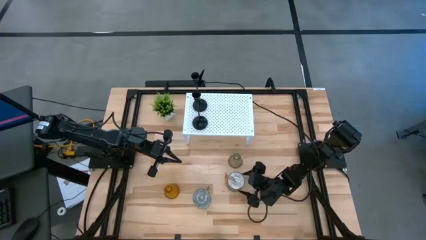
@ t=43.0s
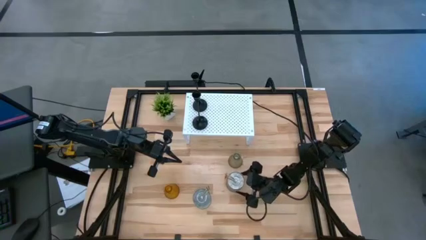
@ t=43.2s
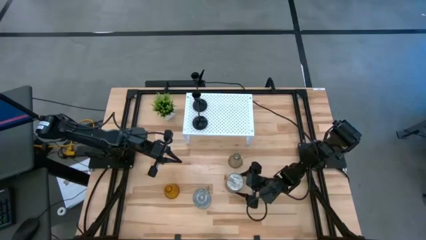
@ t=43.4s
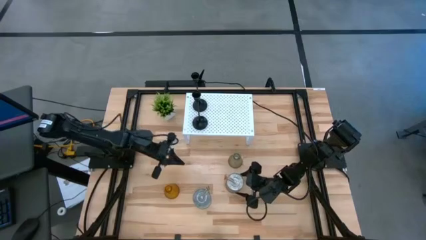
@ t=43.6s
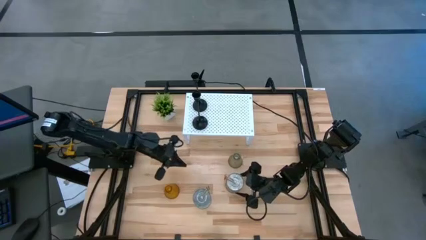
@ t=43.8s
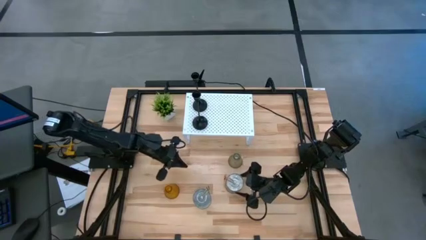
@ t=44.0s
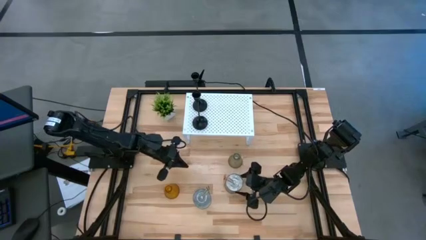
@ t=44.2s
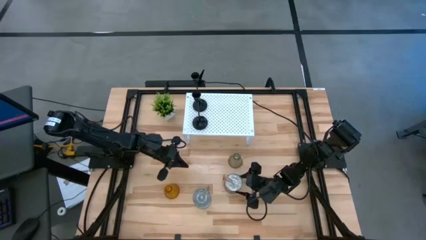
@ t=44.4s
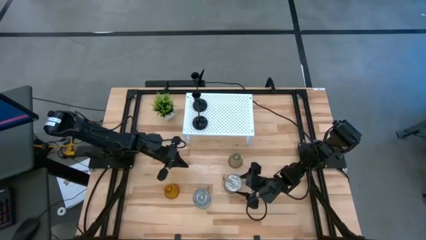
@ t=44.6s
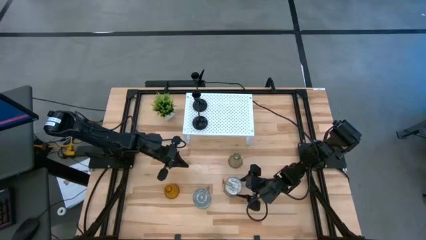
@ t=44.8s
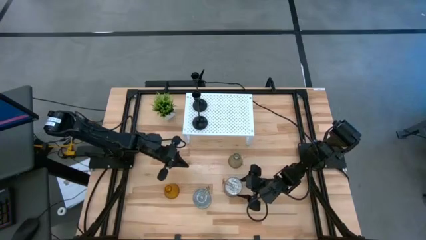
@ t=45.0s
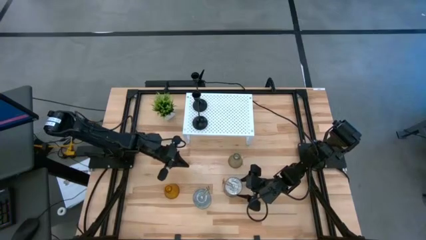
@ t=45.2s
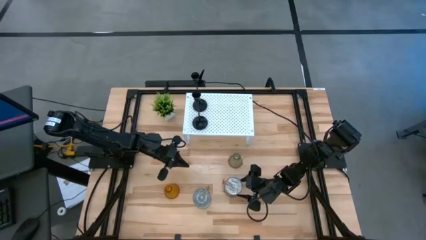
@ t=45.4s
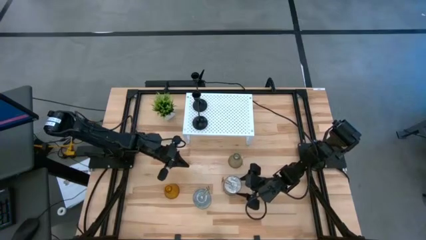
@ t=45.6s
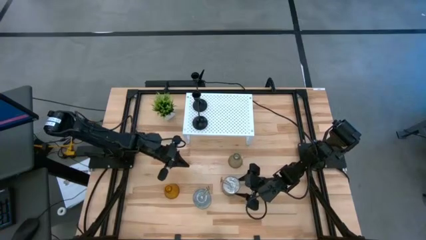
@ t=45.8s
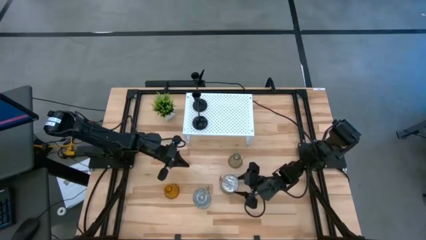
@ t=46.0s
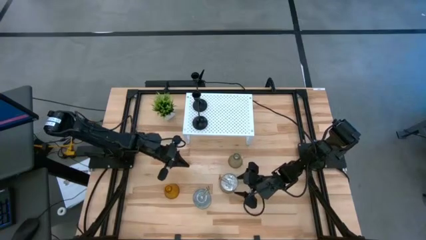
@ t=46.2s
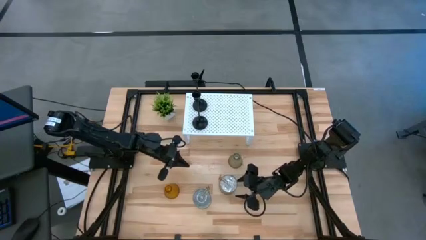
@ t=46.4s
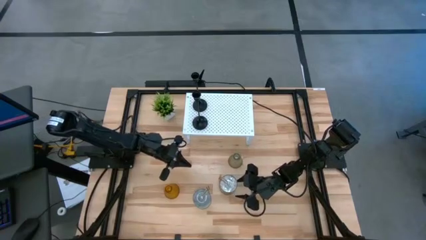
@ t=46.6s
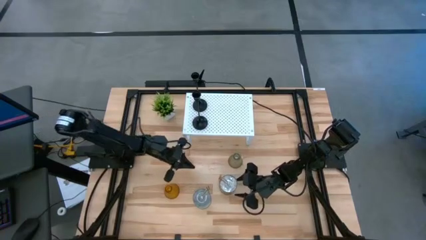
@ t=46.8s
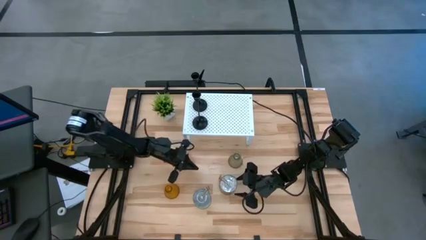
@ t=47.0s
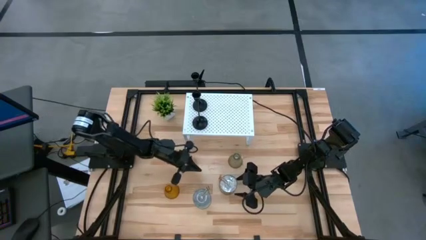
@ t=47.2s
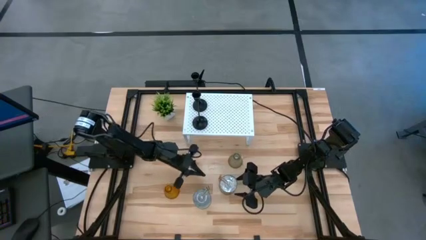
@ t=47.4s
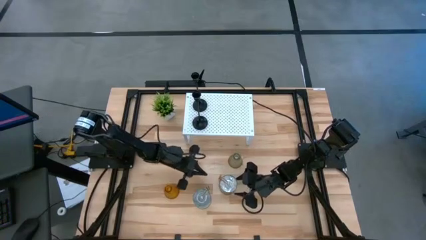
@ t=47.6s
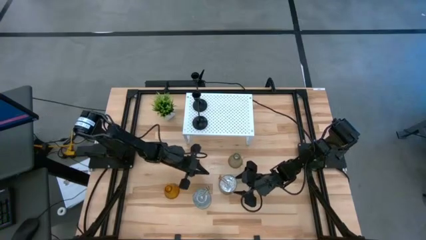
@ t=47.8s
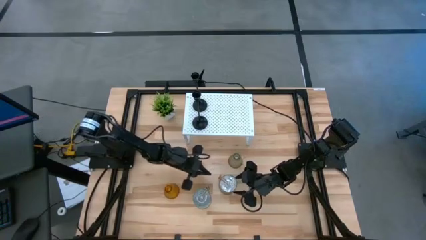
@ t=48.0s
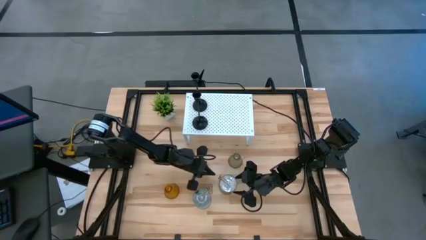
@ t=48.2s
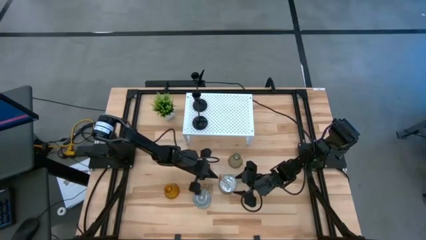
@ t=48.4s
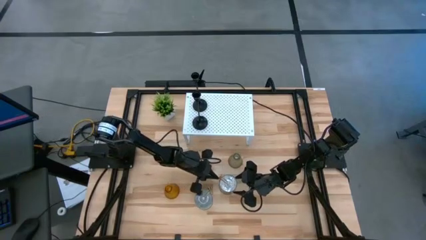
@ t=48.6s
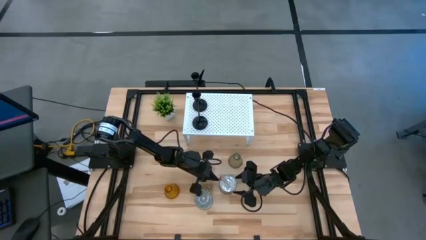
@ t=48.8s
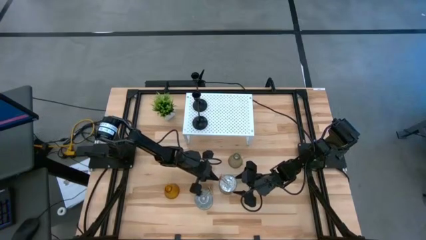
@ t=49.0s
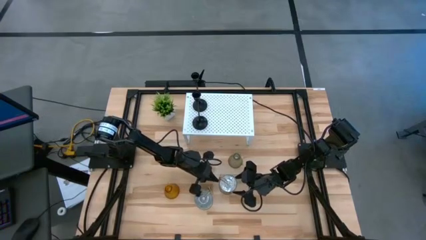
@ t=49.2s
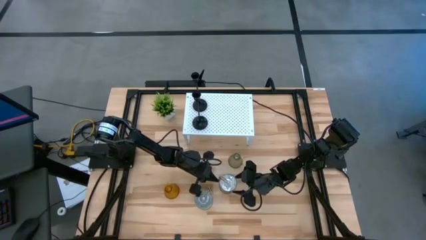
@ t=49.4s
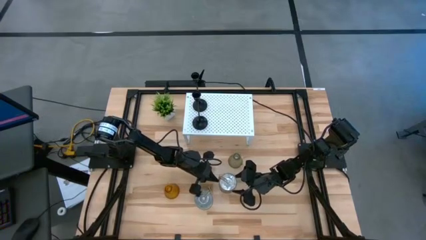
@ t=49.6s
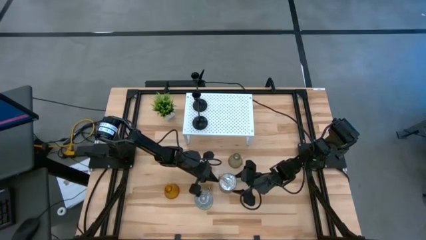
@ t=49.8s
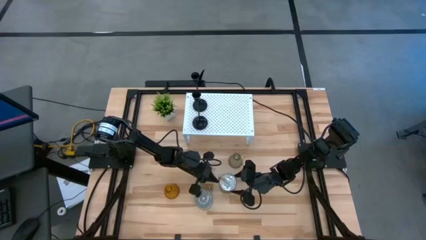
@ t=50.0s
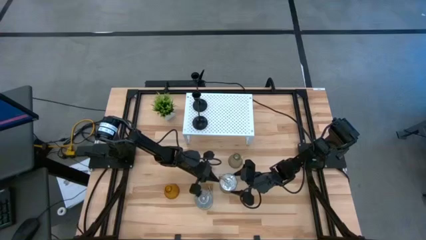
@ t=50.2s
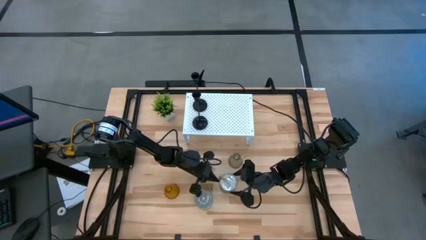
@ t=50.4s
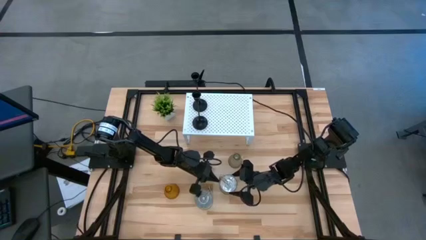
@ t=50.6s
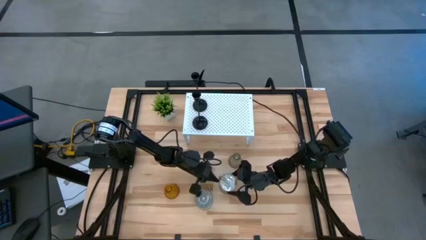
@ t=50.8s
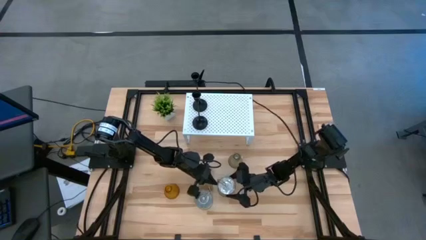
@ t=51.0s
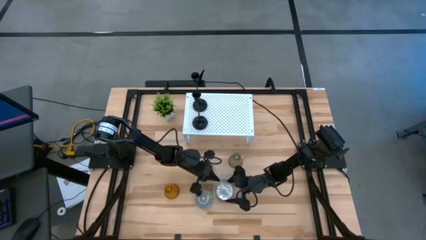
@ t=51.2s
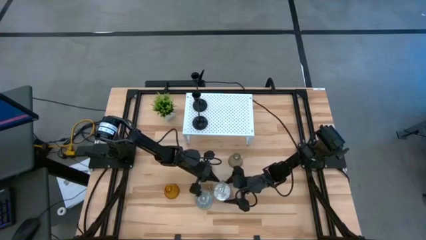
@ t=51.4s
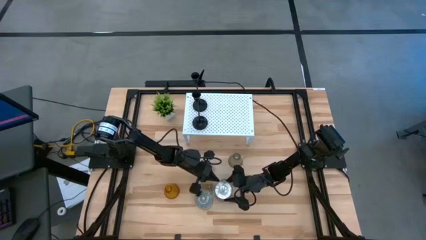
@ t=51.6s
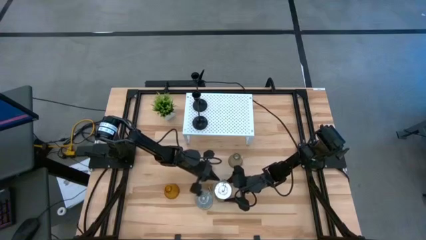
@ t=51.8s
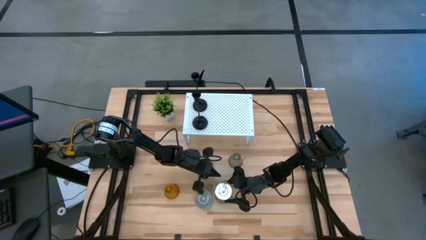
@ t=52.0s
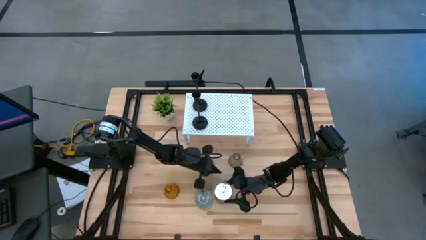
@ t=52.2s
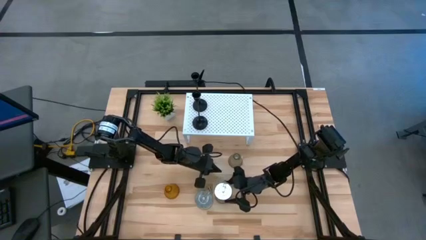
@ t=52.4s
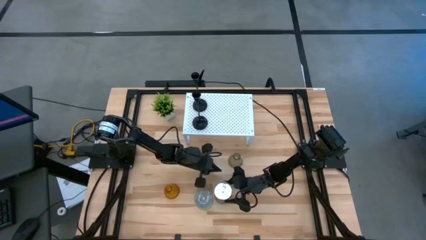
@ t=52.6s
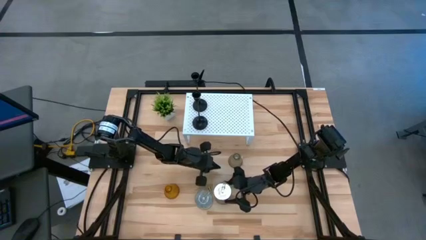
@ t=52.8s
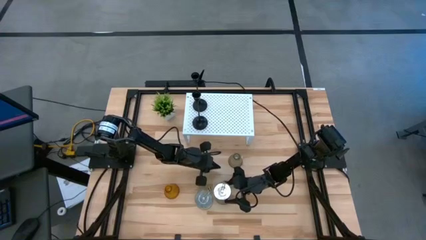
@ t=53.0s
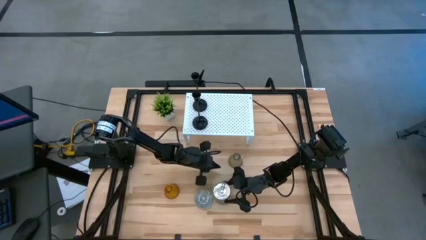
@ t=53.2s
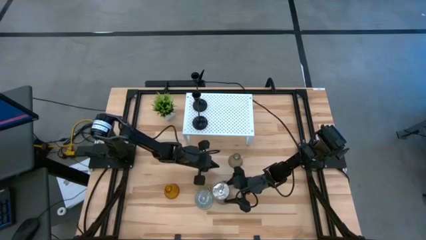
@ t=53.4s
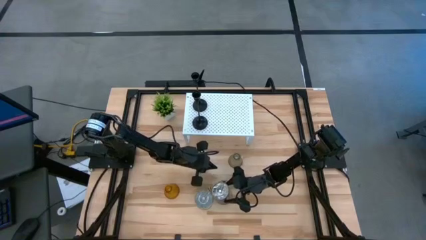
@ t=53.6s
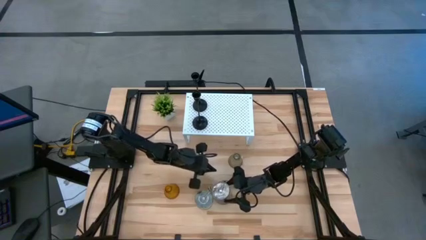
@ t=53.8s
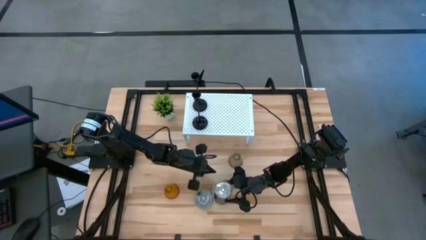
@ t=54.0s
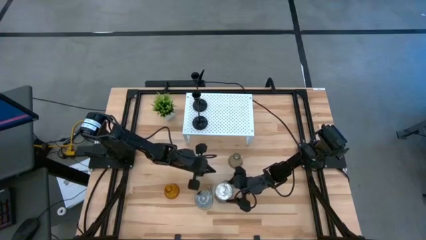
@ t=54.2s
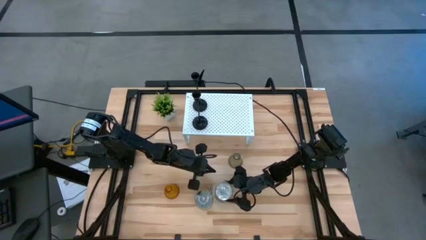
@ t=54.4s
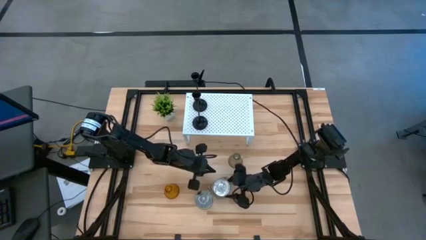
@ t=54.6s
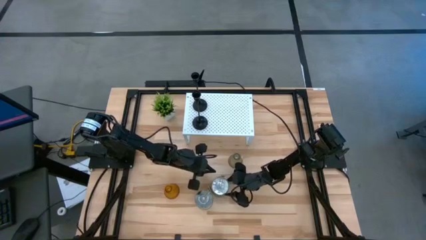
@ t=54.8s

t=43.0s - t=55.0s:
Task: Pick & Place candle stick holders
Put the right silver scented candle can on the shelf
